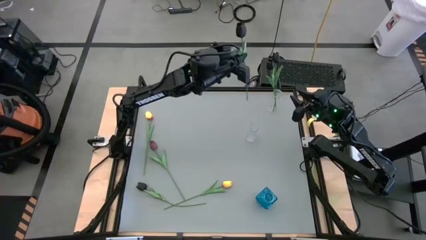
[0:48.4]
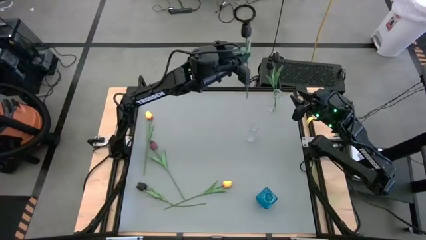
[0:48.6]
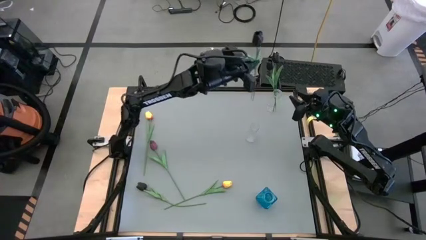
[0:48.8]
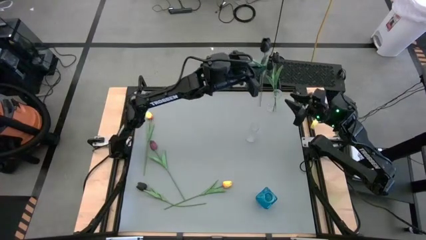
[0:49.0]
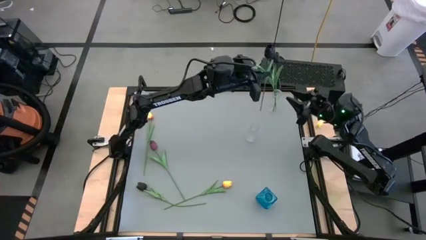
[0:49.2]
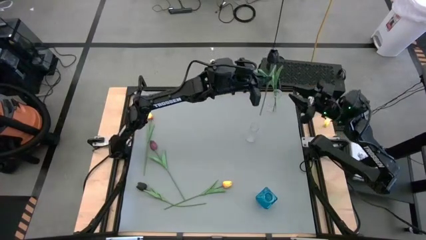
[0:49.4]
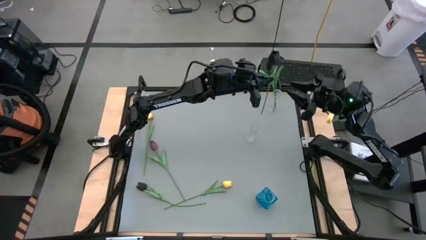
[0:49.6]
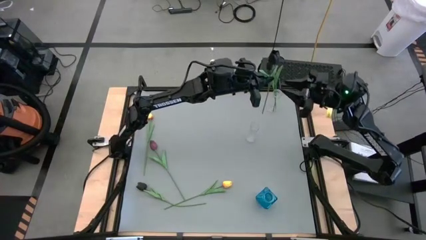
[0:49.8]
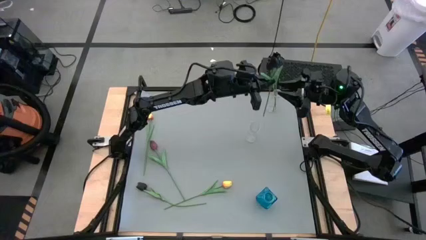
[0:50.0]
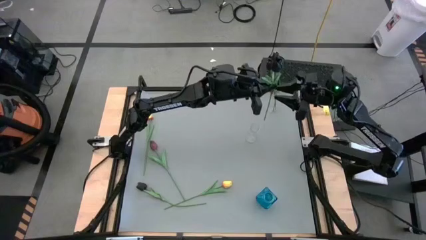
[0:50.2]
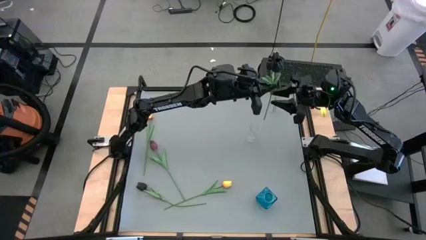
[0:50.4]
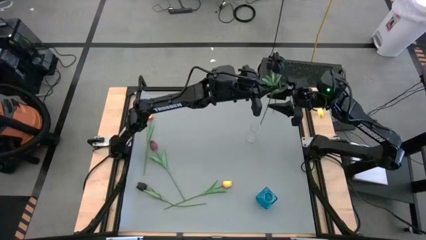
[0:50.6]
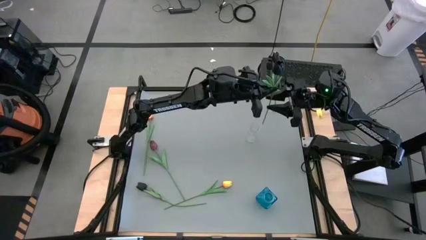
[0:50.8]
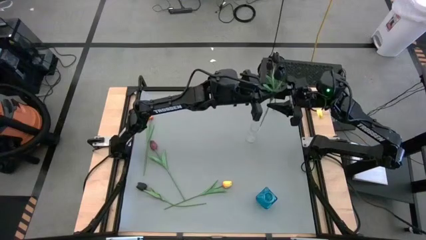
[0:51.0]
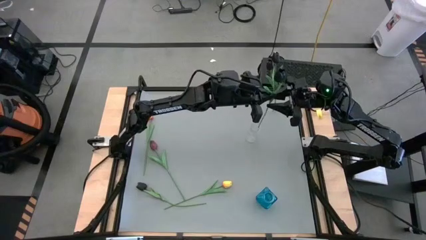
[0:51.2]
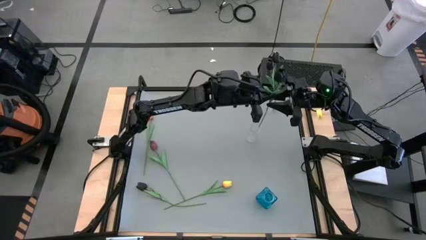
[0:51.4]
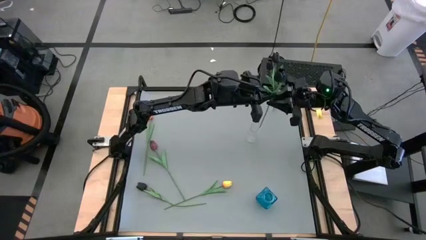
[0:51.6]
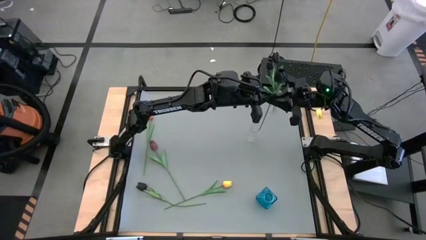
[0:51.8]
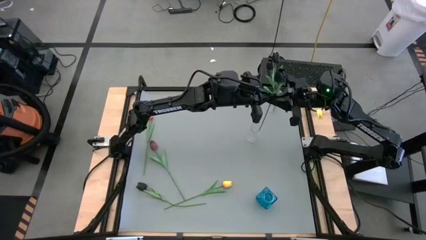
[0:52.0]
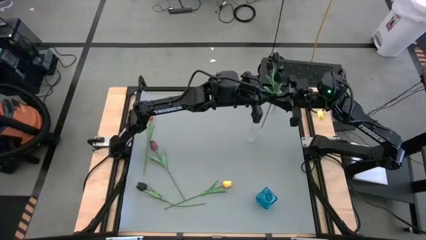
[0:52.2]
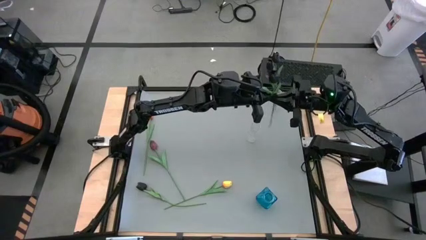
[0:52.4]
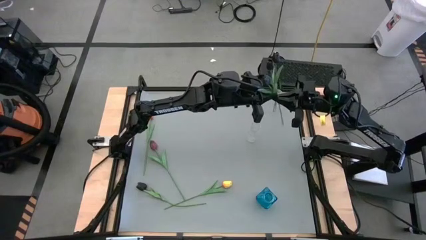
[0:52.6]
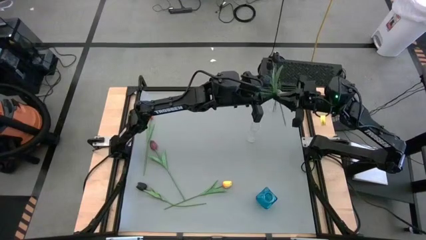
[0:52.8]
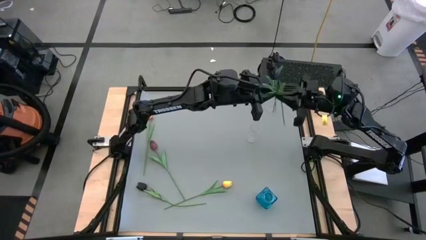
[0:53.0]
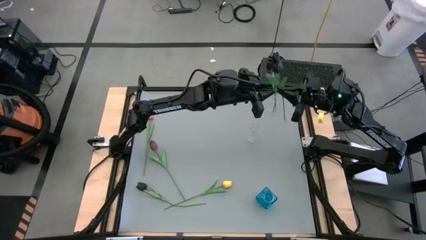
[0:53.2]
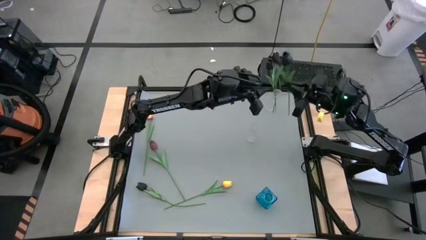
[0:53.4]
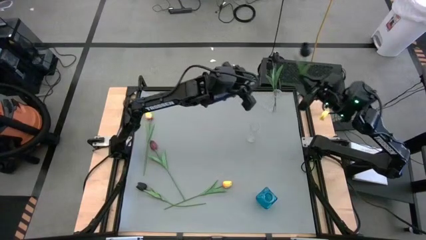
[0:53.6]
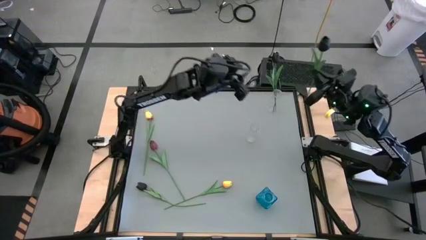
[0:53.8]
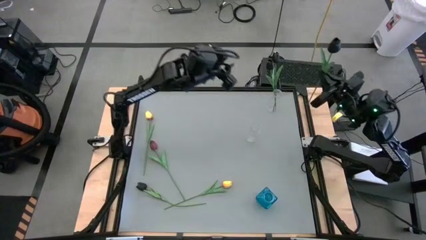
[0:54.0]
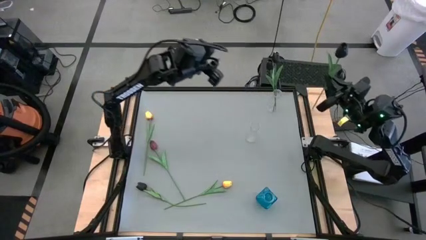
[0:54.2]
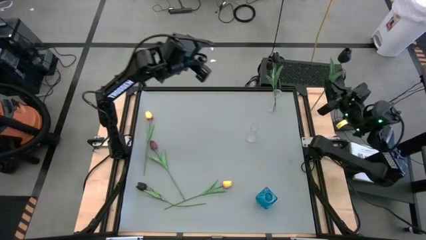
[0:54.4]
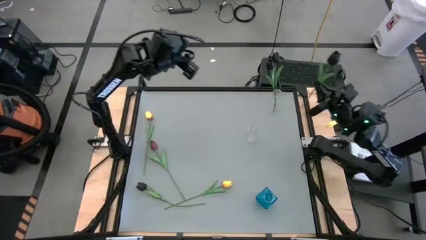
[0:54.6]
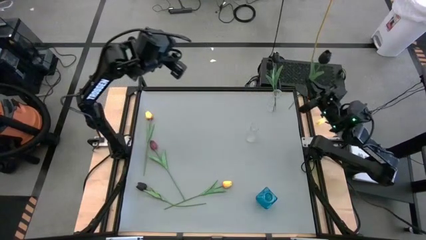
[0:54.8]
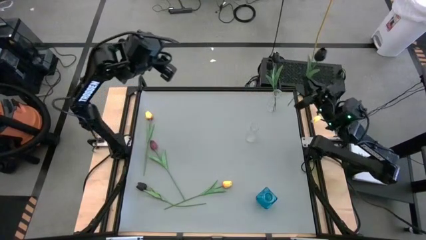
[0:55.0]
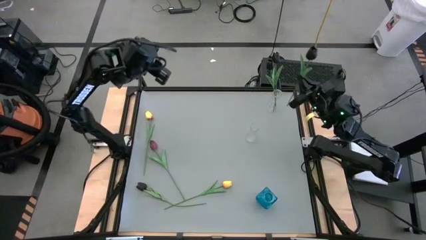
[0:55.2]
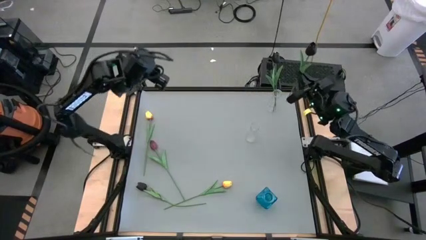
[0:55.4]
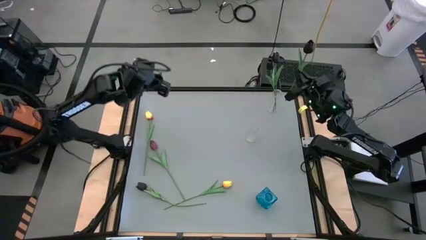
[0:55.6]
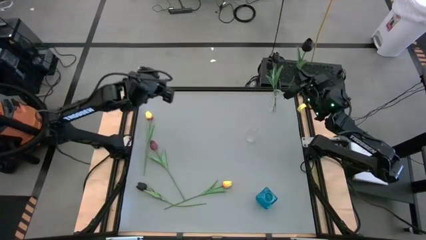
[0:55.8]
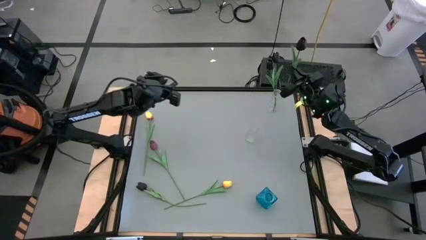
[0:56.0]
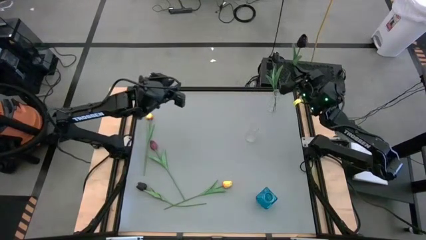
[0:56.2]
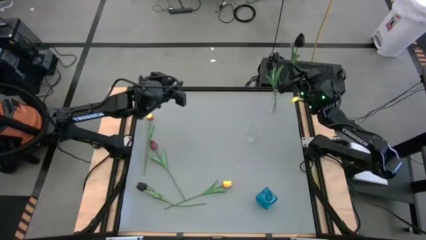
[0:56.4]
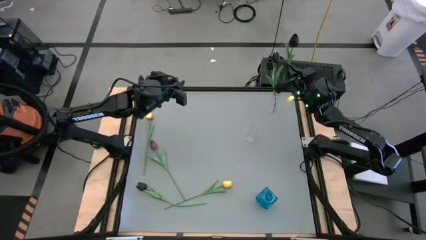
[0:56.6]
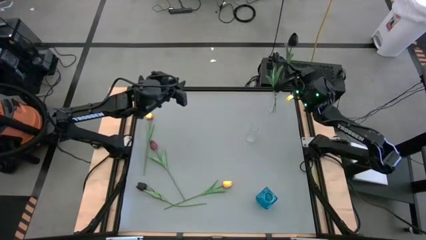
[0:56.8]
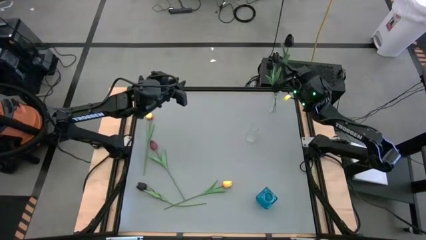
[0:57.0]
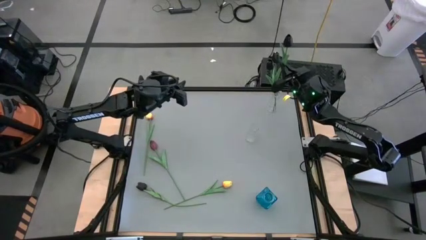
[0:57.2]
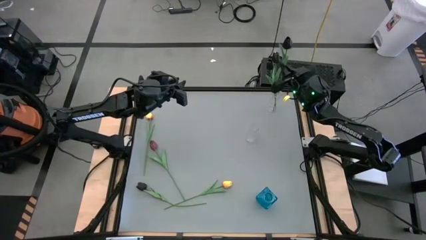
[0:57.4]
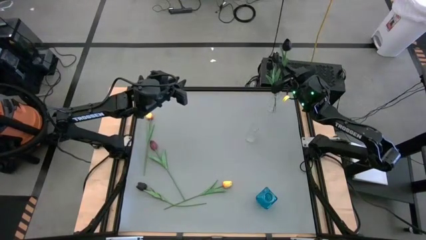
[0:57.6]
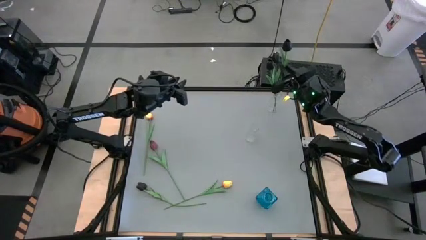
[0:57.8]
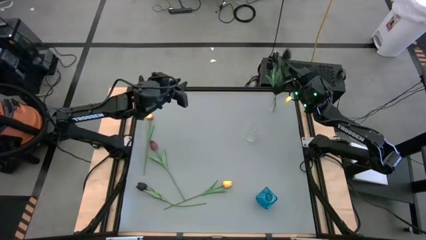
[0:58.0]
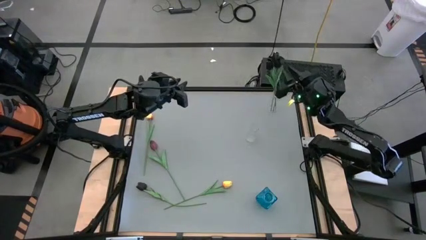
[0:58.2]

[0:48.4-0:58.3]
Task: Sort flowers into vase by color
Put the top black tulip into the top transparent vase

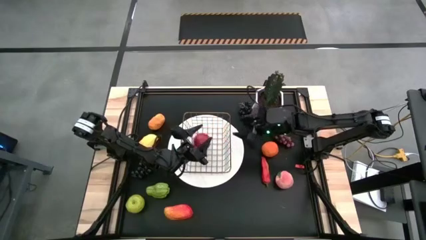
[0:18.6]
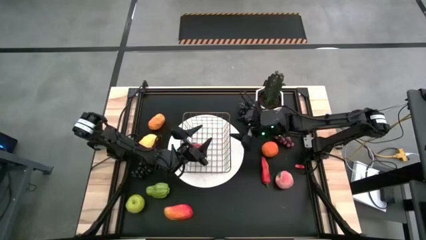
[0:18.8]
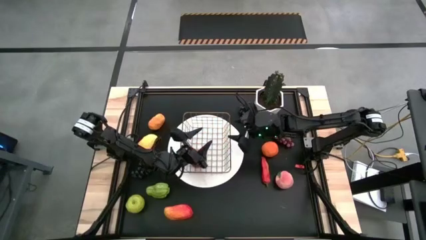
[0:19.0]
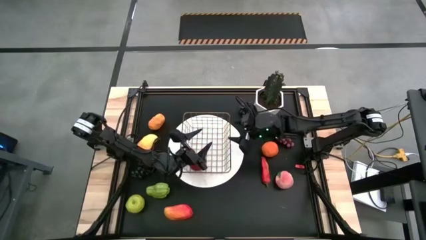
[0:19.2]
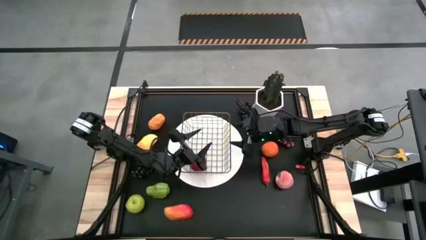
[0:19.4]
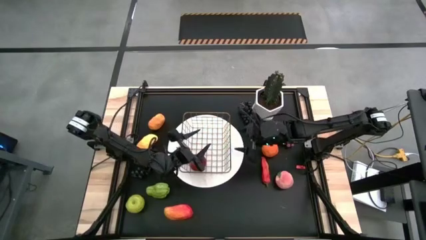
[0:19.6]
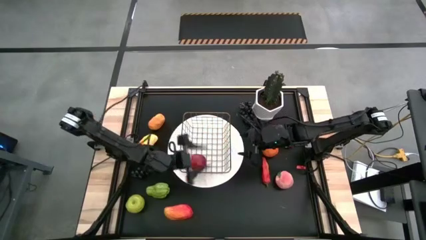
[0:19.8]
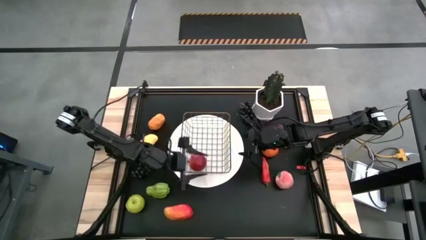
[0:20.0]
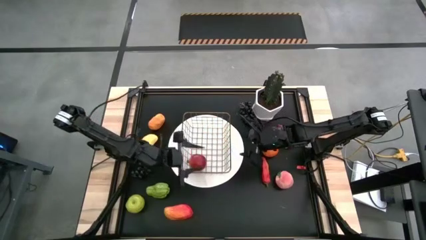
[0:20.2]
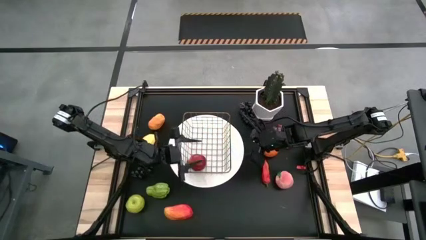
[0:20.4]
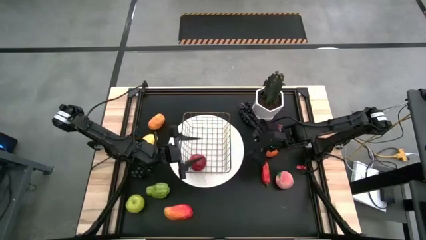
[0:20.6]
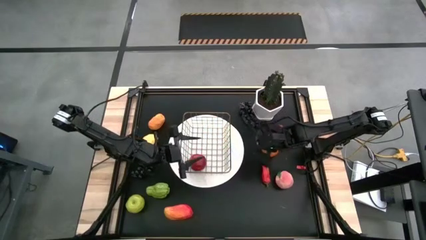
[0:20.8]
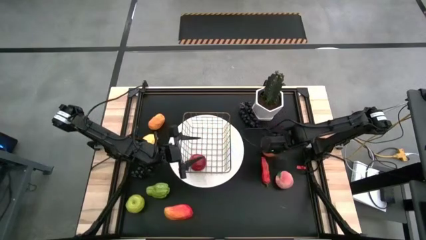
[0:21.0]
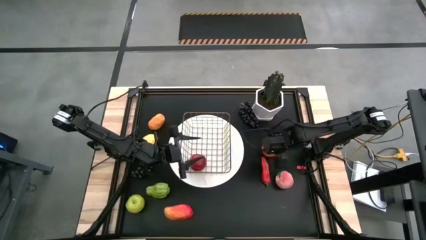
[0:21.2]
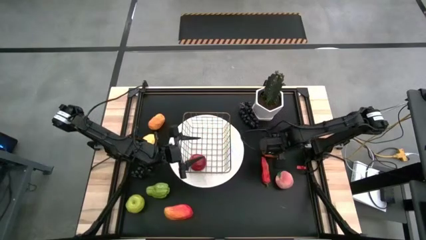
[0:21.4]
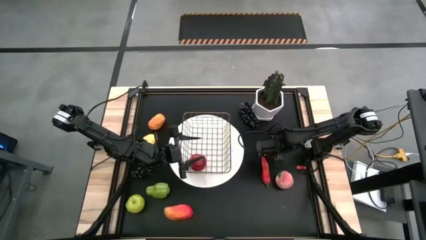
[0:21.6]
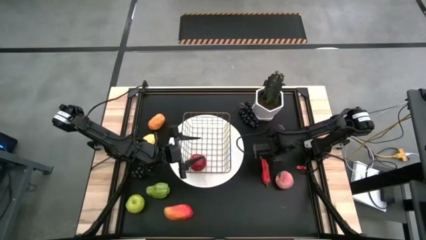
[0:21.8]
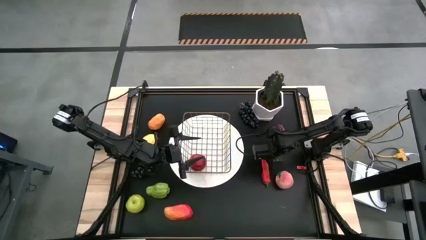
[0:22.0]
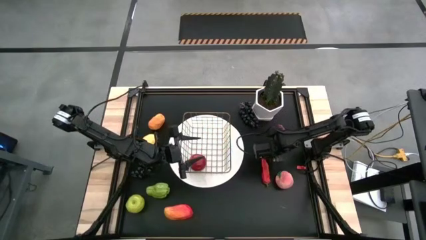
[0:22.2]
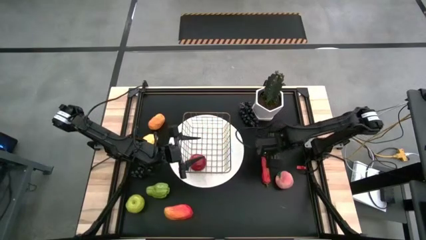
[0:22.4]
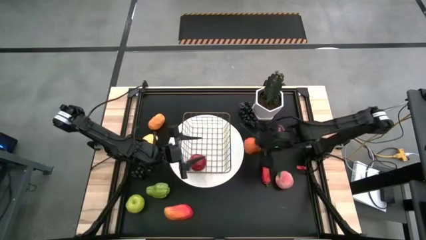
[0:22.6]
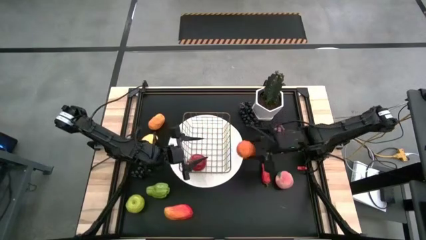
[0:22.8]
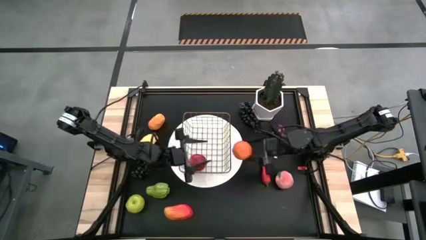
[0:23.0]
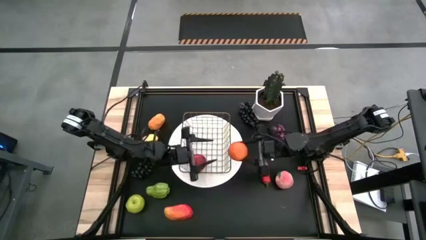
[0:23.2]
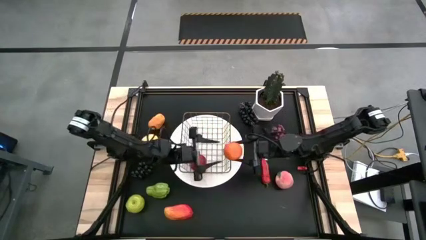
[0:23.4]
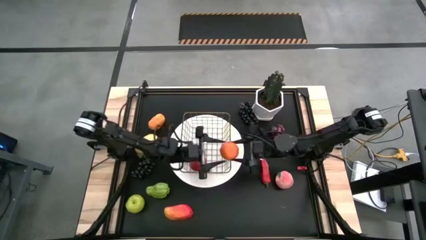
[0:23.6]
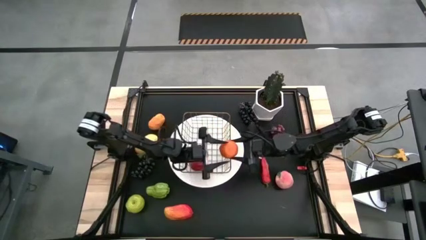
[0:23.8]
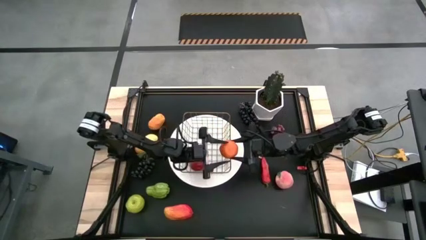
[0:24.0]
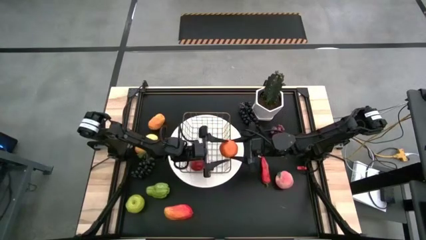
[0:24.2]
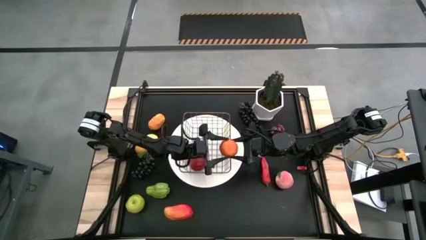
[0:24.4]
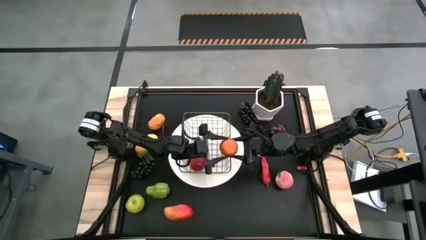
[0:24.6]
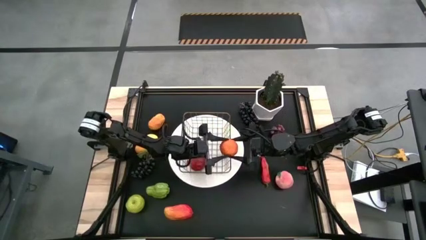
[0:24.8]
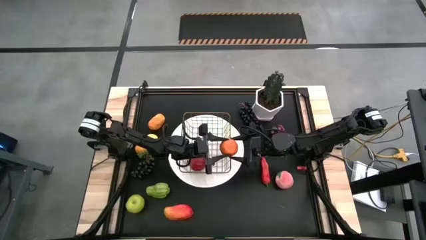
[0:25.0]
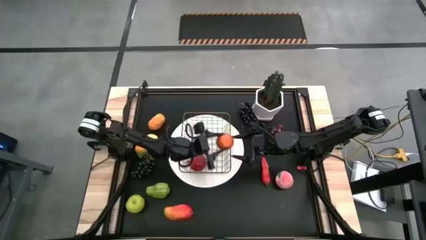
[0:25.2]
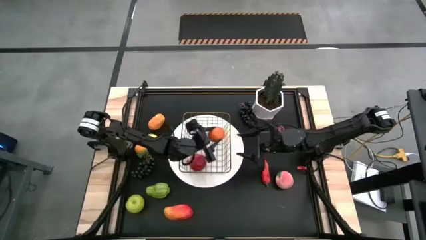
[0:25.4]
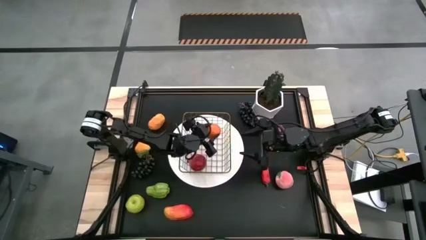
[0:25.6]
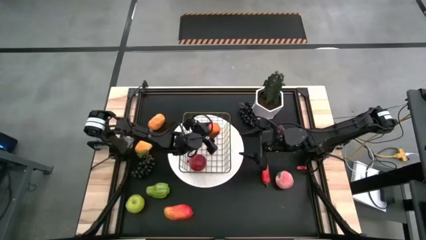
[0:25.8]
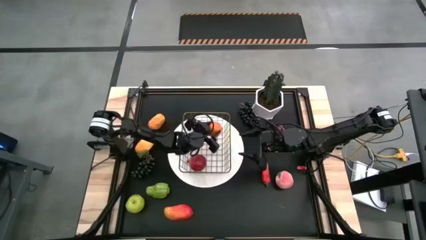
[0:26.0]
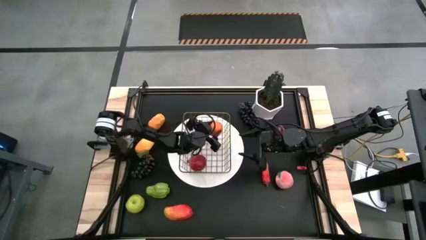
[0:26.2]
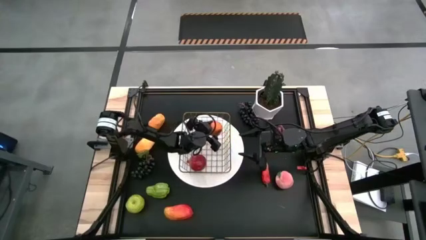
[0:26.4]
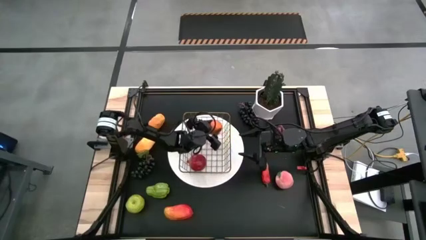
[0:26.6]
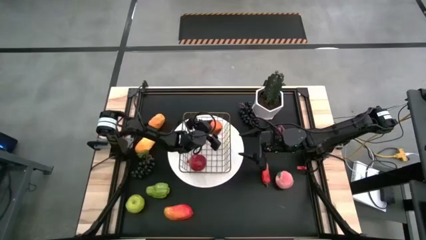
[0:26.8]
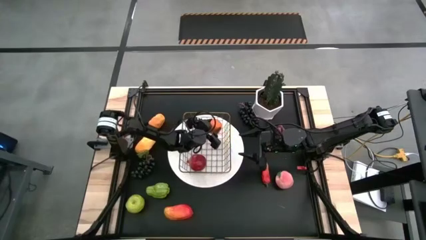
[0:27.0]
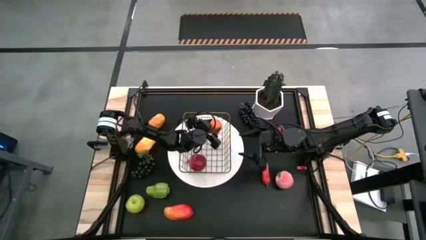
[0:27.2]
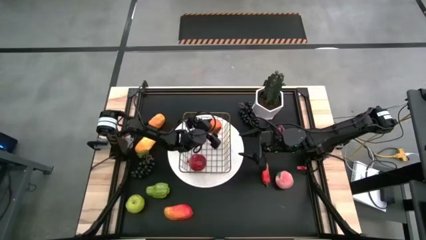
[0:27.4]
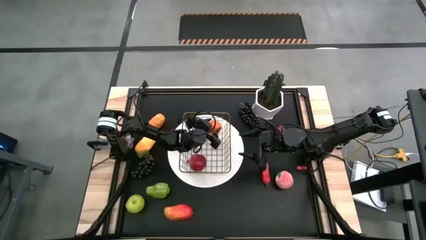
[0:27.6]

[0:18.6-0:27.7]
Task: Build produce basket
Put the orange into the wire basket
